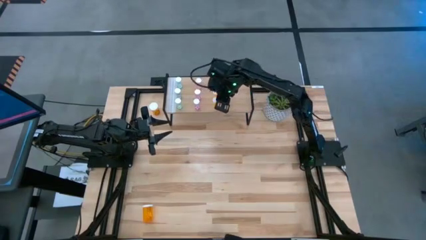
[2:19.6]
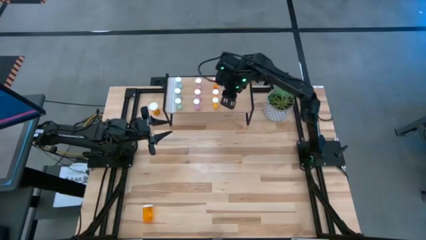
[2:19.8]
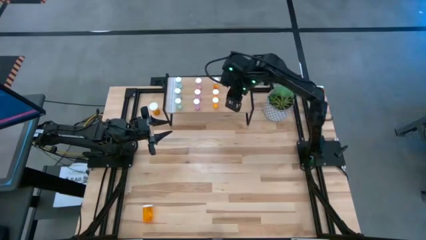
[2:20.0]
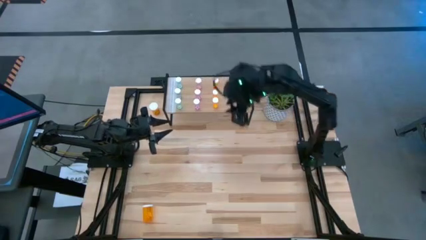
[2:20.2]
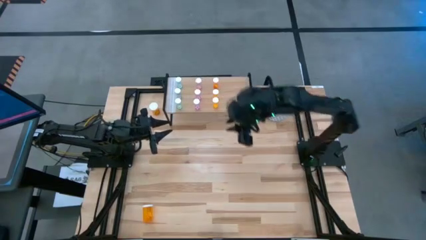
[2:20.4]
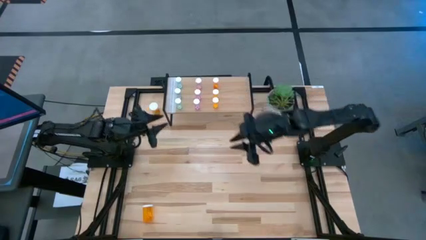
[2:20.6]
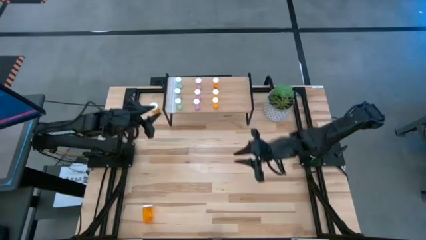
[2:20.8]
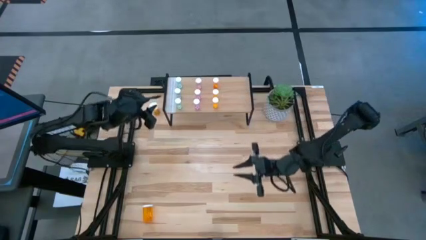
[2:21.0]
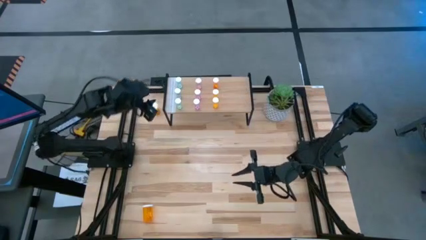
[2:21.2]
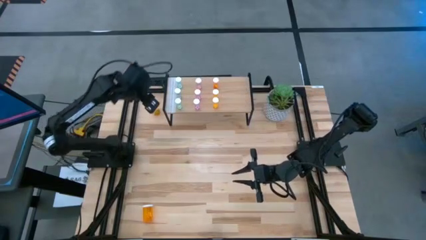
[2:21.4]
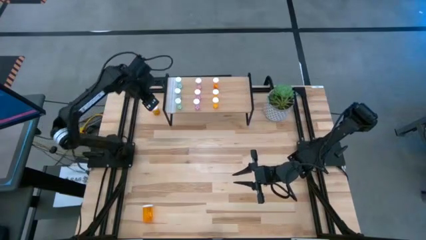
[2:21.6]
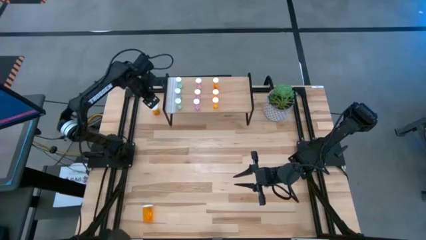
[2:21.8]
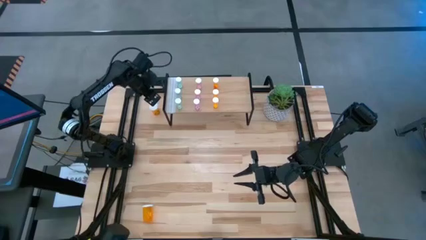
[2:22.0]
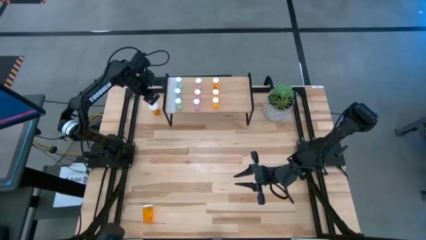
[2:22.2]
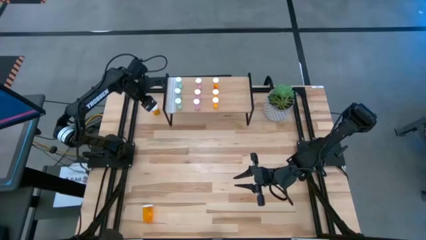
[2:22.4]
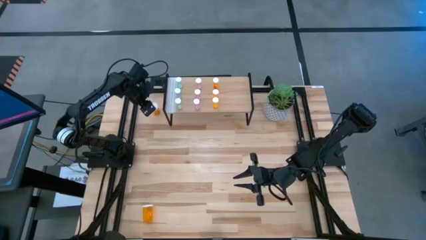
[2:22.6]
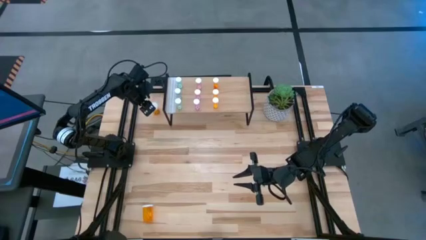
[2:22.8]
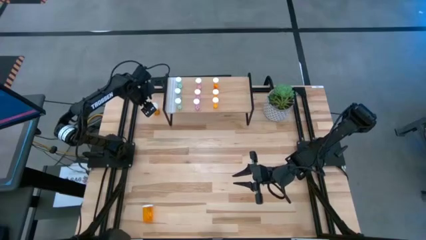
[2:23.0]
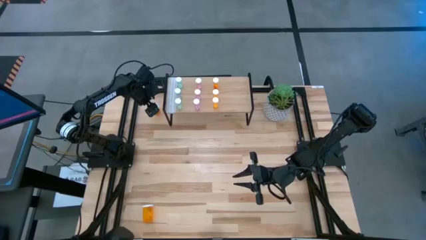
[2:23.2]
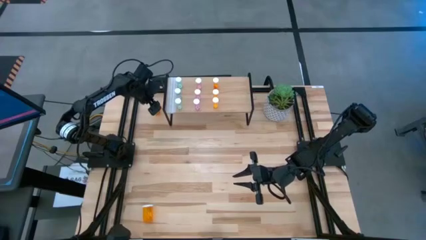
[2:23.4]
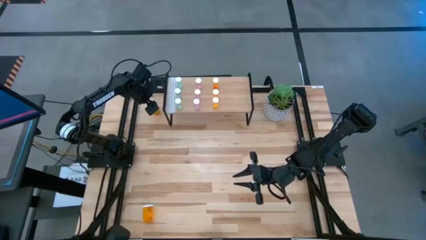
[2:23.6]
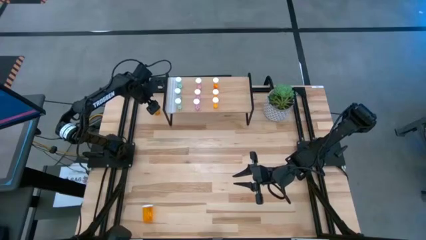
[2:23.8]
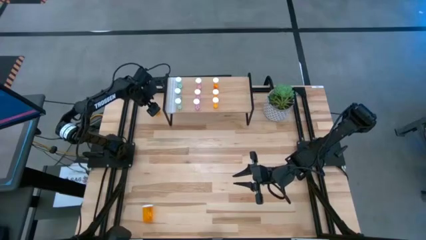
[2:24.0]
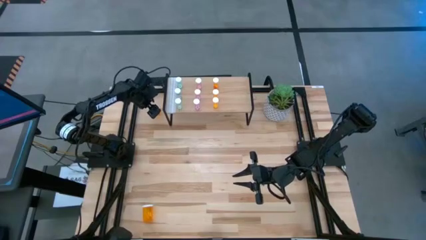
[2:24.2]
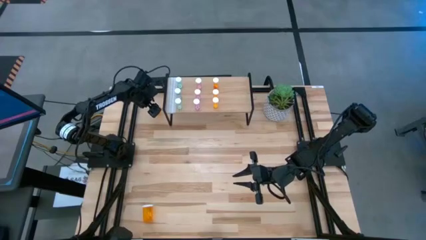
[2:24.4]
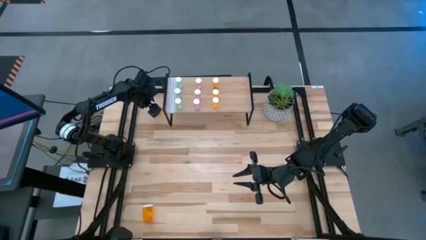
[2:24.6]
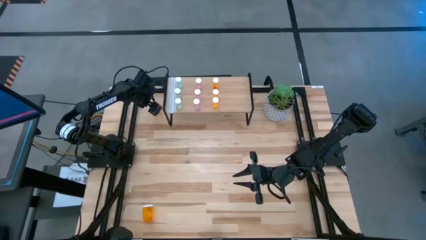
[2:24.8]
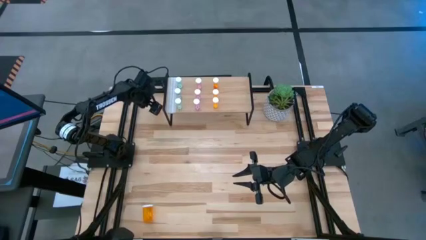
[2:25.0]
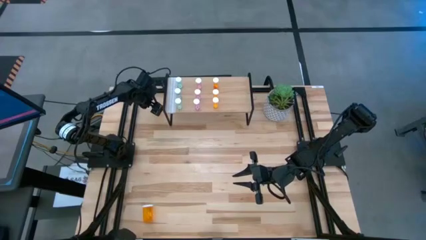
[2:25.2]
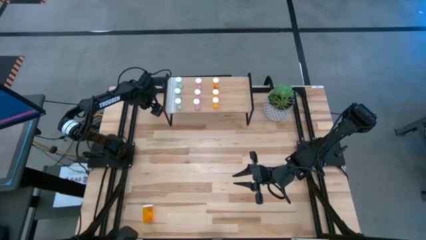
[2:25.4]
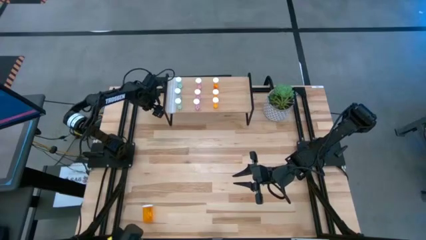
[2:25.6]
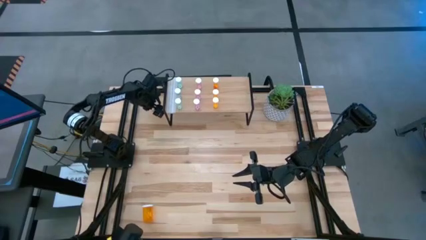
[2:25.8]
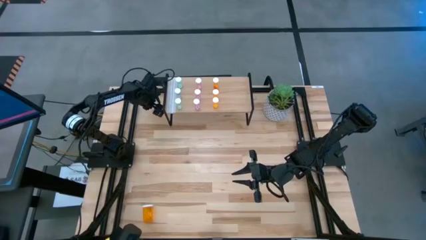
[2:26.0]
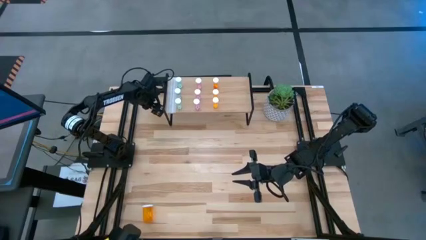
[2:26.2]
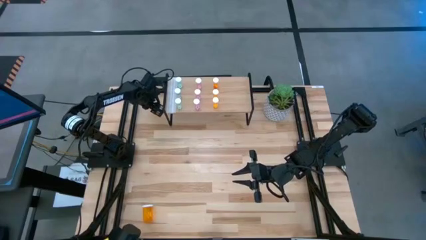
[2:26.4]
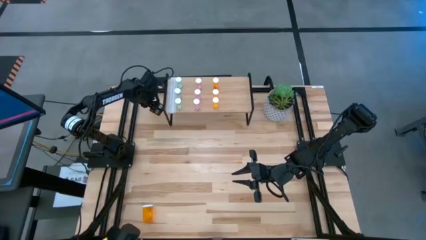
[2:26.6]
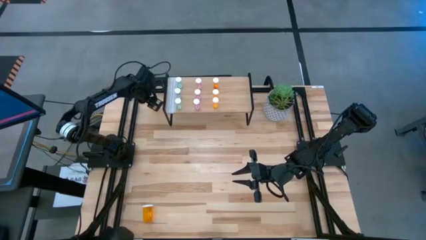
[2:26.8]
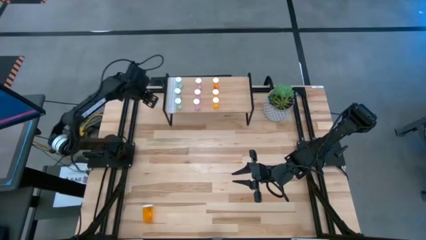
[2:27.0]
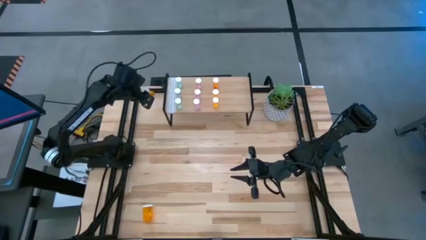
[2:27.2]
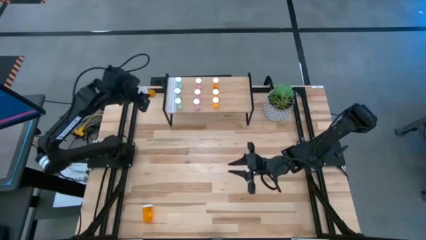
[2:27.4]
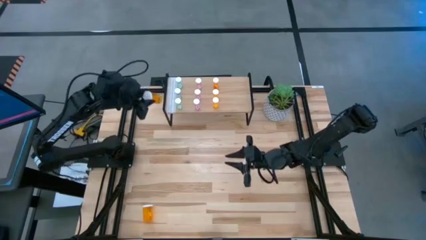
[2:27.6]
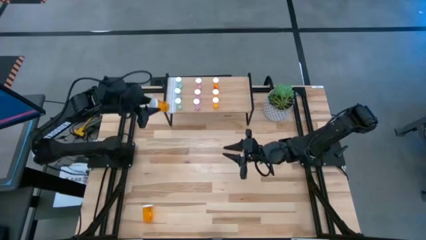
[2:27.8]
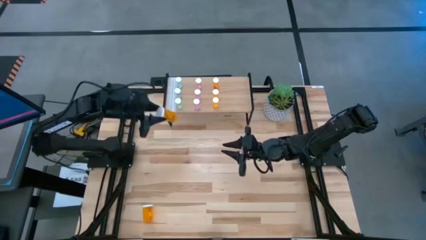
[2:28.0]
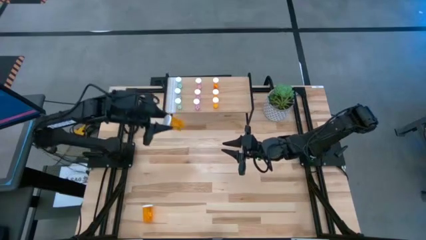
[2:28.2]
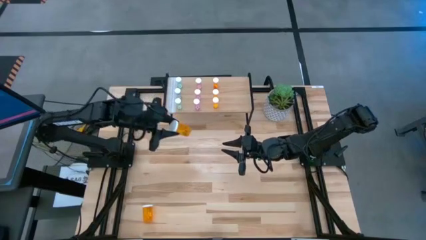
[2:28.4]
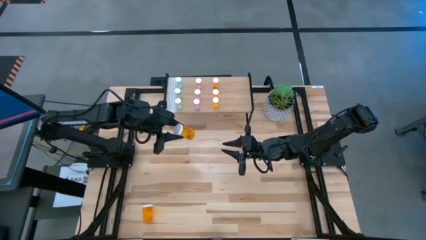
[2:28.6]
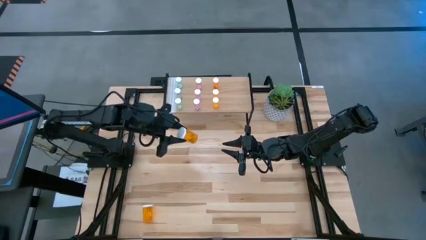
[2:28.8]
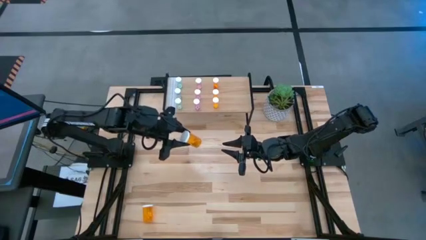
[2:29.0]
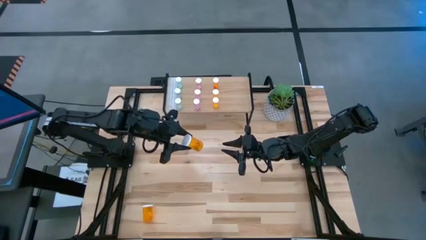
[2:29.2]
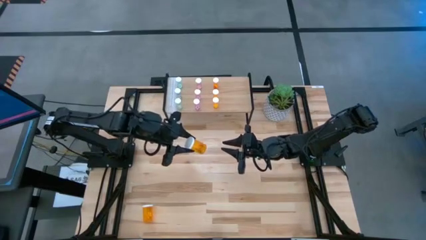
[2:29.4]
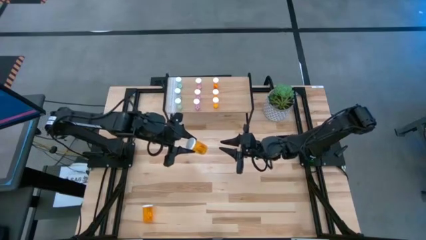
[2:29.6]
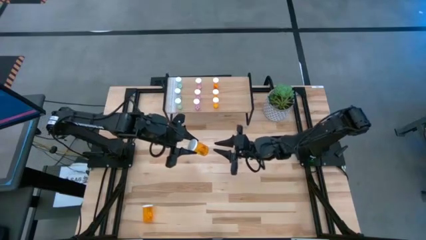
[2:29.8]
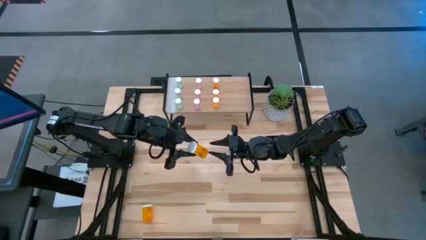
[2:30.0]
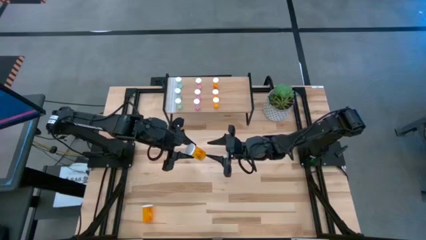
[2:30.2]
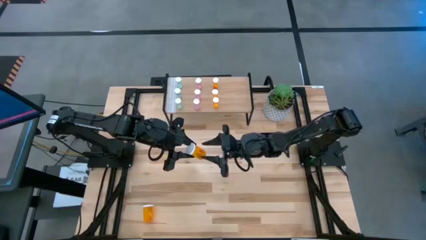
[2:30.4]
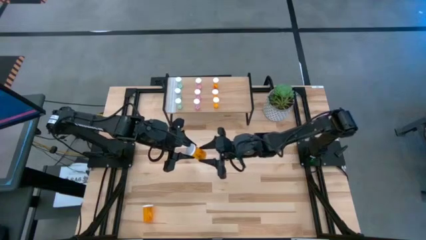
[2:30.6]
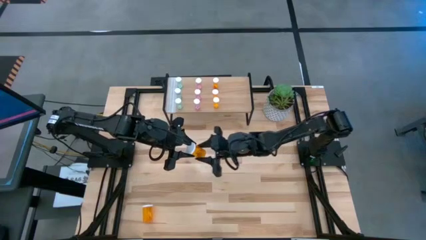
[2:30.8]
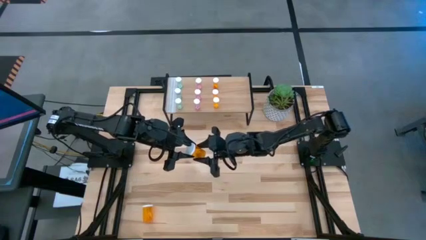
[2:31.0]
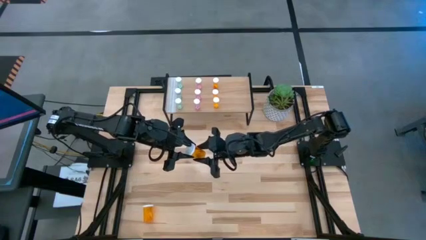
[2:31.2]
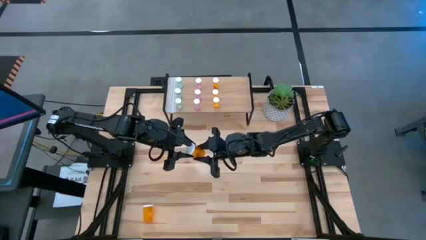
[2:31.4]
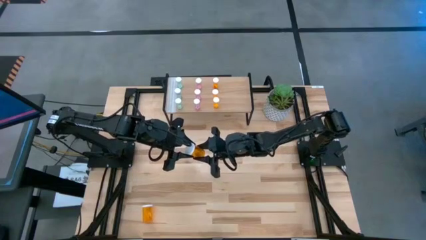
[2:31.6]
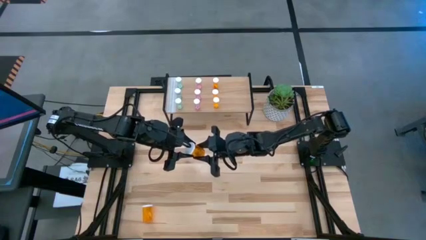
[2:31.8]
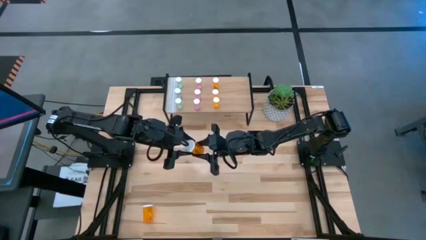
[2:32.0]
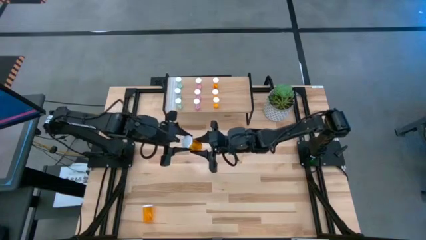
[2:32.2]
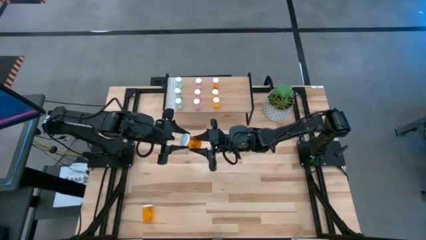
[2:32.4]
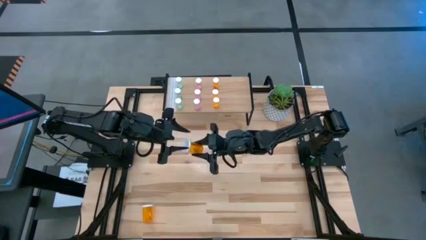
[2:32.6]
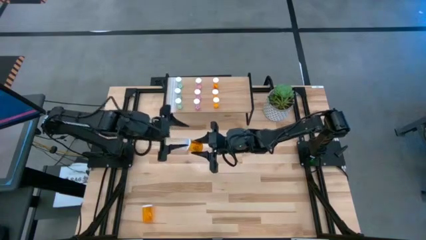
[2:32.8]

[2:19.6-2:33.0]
Task: Pick and place medicine bottles onto shelf by color
Put the top large orange pill bottle on the shelf
